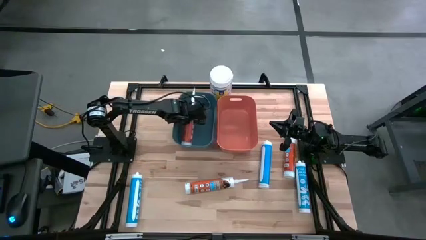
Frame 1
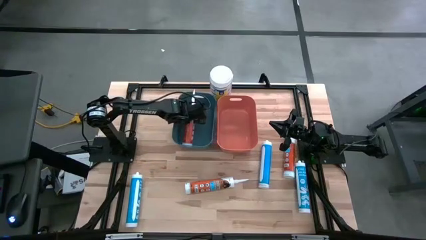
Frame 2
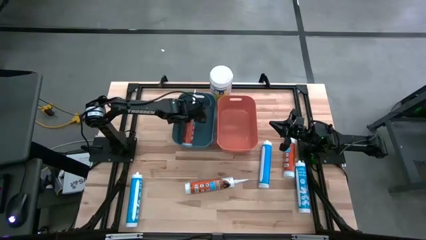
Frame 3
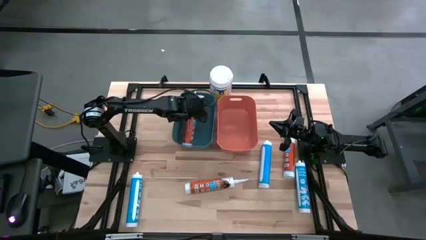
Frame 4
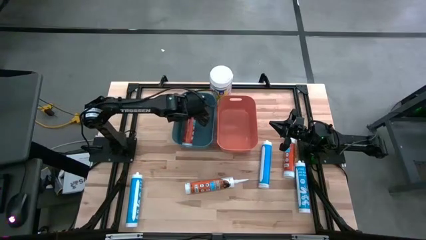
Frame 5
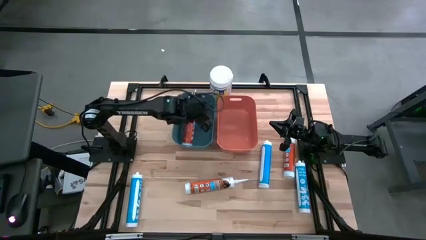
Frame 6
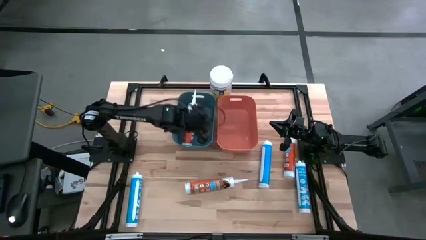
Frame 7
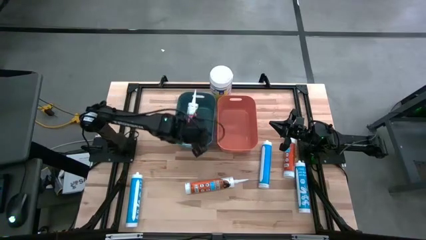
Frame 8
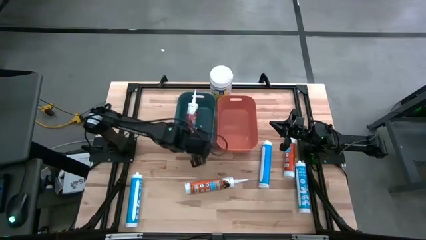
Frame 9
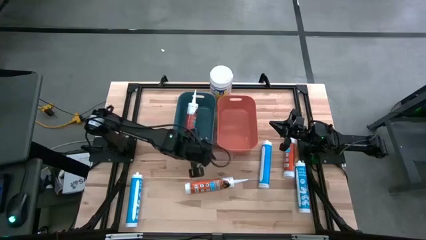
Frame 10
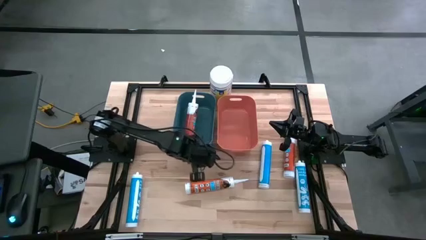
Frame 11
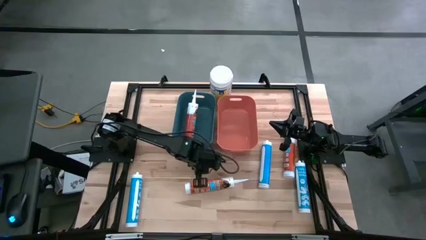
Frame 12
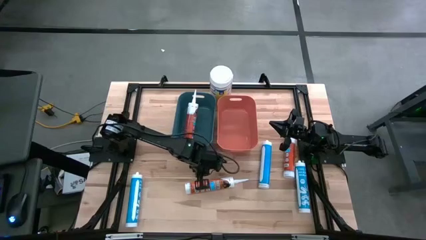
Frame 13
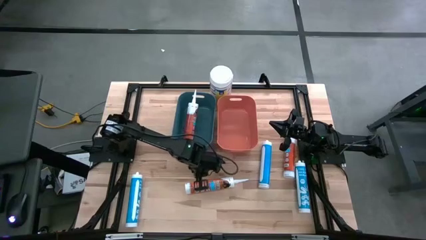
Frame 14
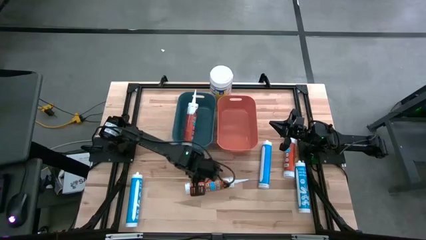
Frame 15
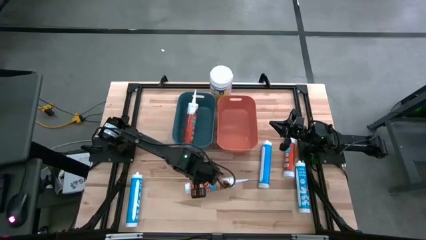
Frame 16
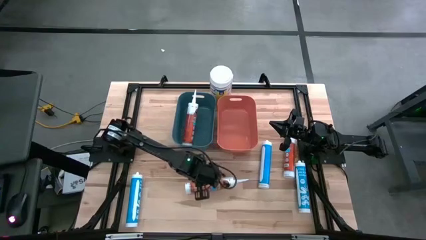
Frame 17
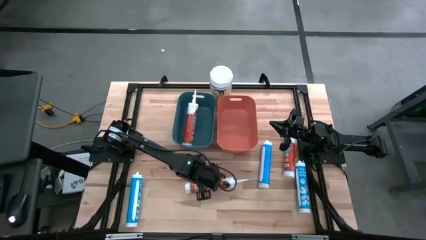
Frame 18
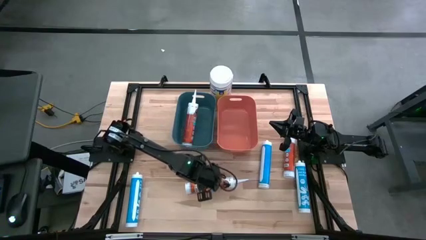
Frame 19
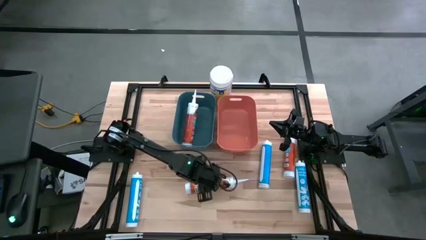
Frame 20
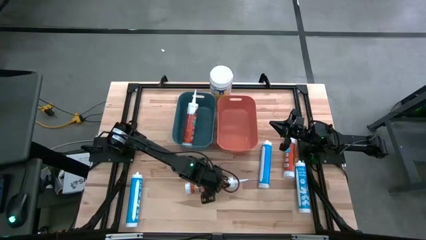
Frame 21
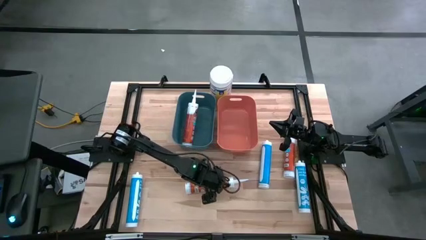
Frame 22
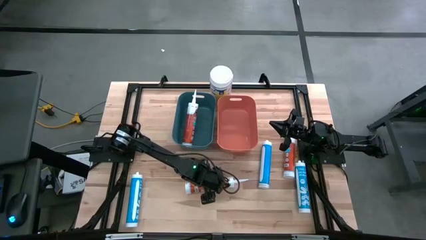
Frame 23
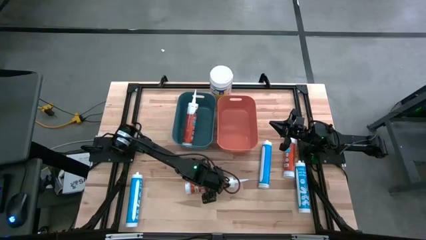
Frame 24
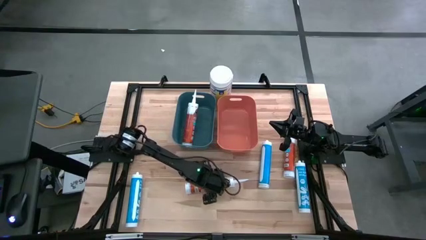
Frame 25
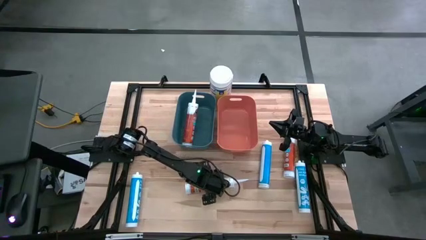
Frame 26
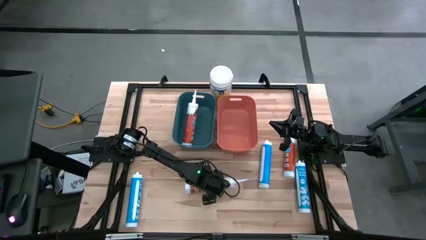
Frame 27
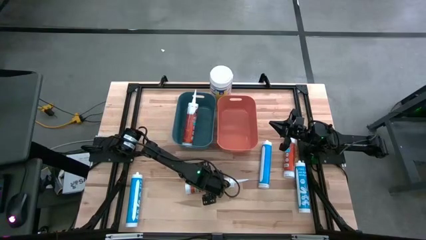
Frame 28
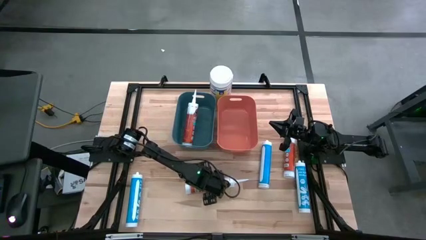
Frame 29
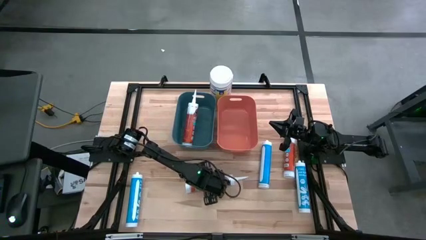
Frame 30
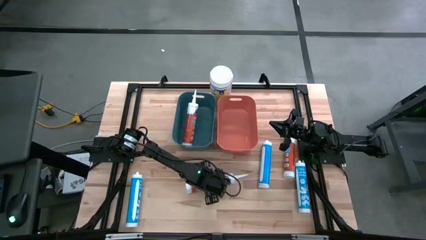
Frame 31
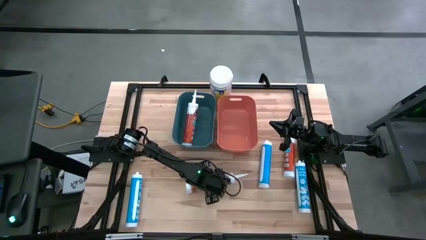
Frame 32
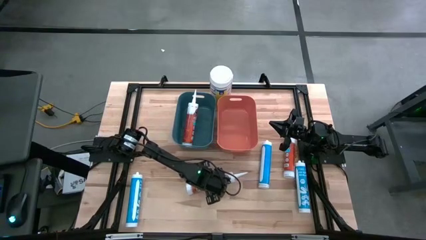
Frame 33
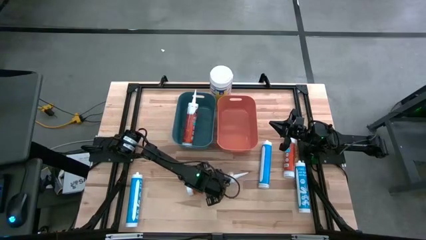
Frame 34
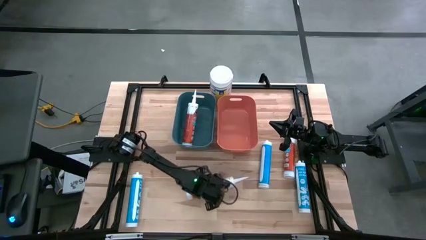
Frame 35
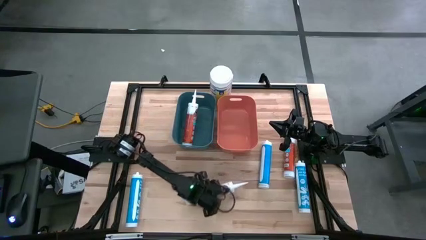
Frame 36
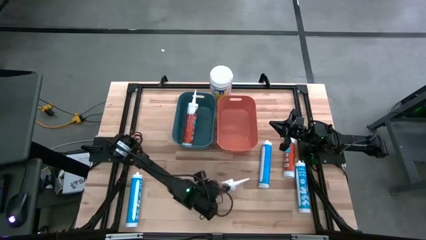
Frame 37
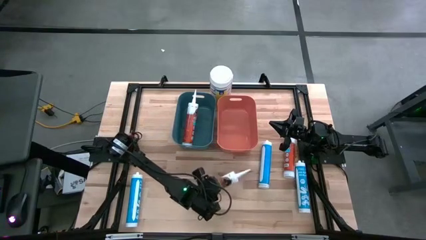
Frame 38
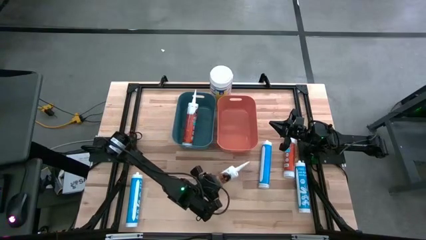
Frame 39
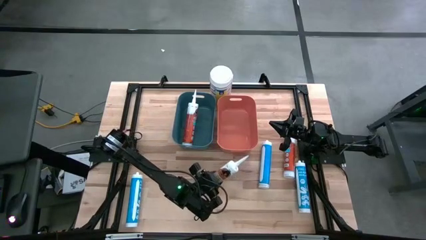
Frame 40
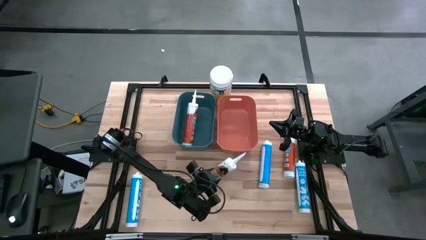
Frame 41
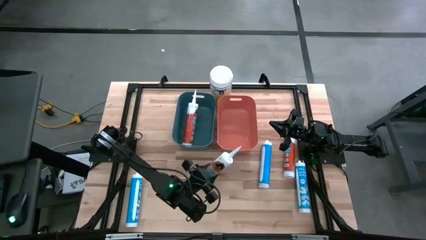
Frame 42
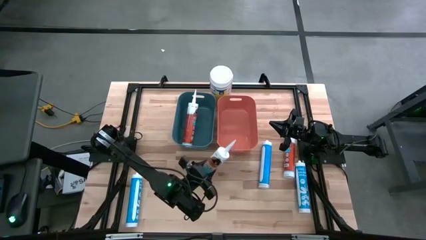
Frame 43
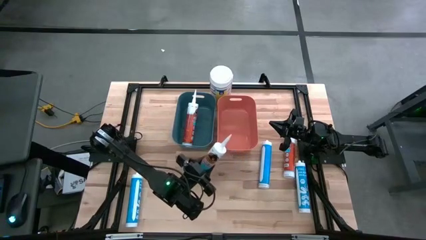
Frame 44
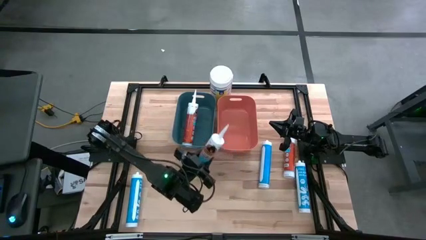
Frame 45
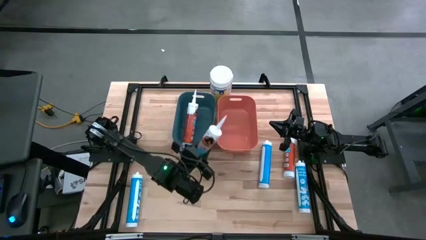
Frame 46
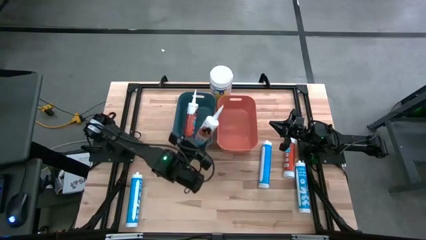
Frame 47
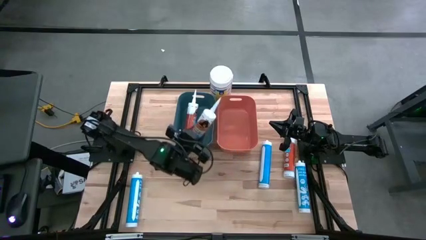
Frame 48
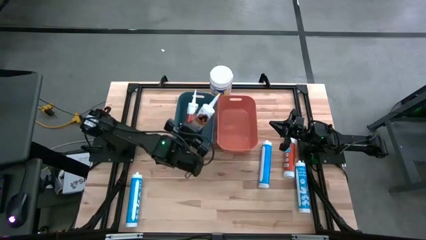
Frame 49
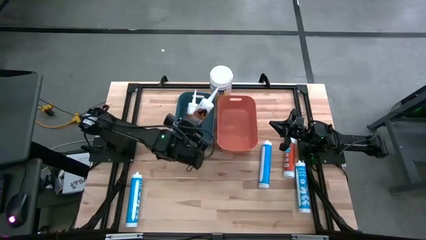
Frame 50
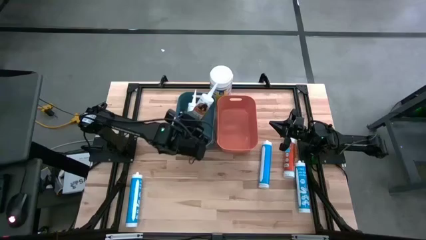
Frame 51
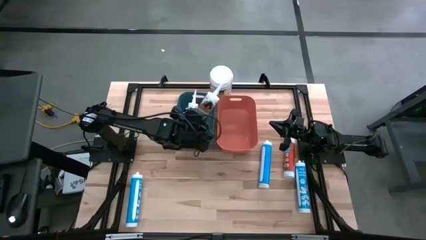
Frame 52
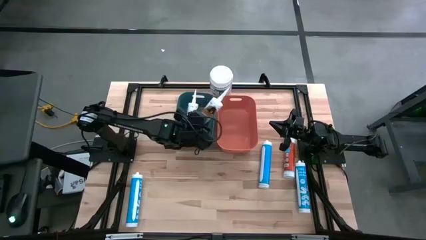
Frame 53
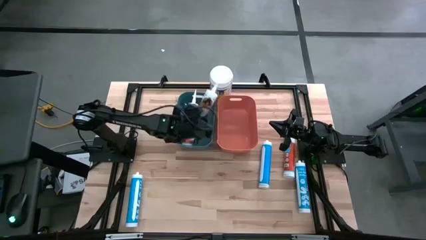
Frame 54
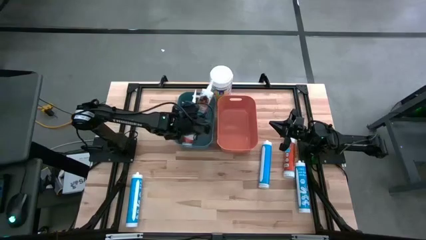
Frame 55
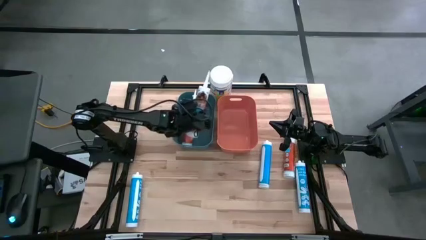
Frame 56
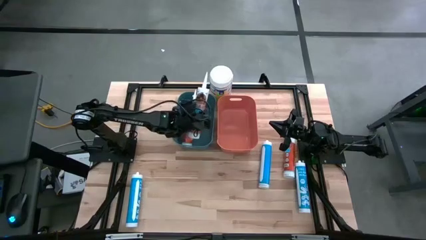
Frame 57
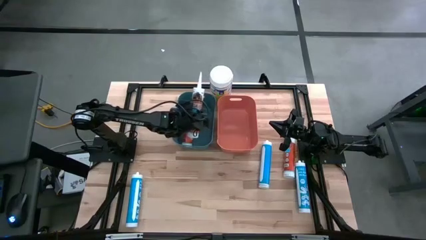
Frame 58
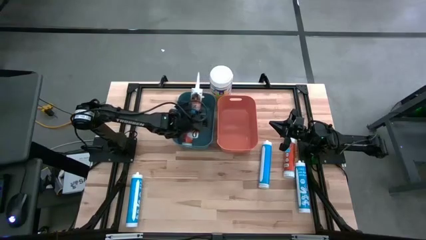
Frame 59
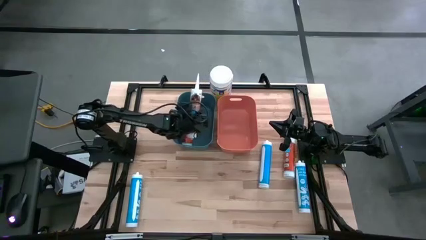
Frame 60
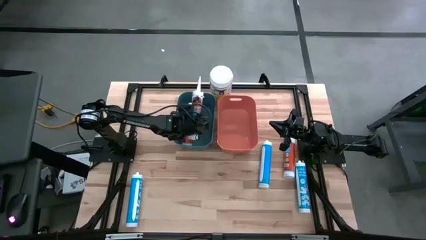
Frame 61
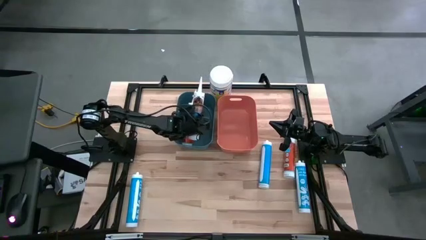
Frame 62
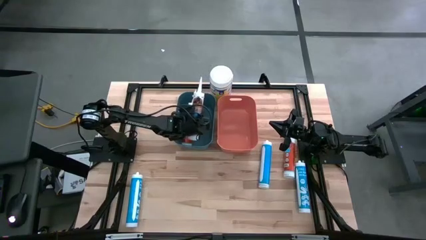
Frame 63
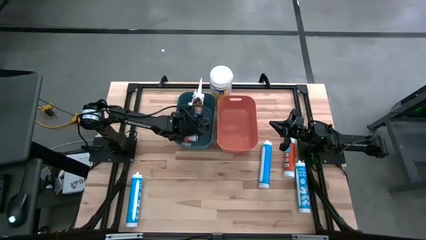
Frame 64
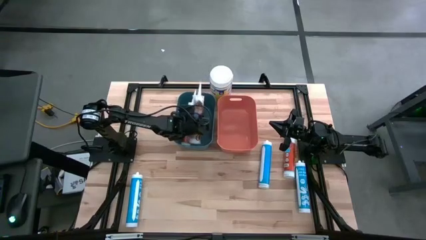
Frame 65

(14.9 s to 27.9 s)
Task: Pick & place silicon tubes, Sealant and Lysol wipes
Put the bottom orange sealant into the blue bin
